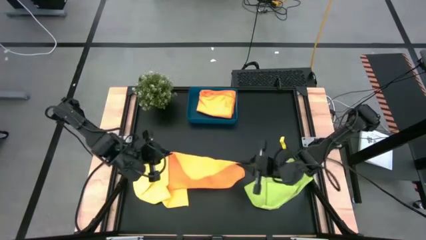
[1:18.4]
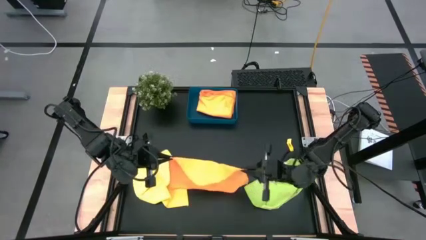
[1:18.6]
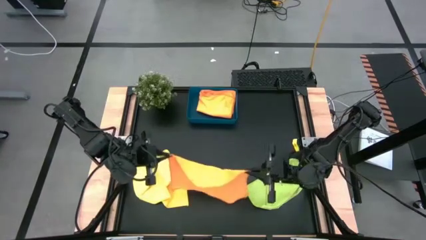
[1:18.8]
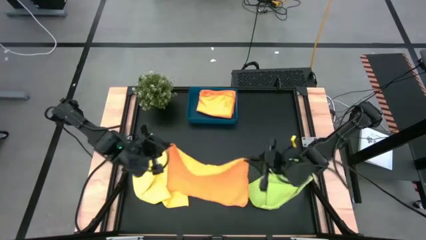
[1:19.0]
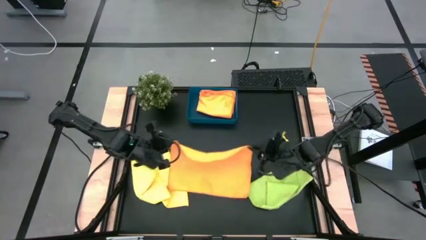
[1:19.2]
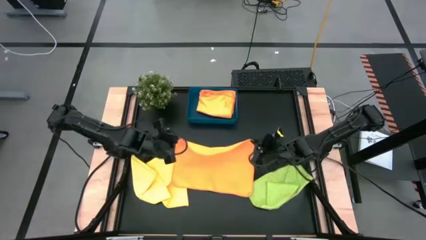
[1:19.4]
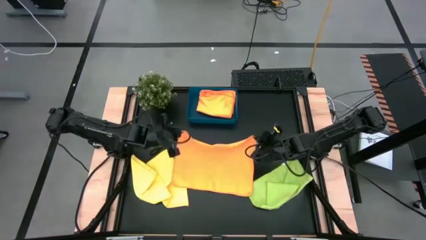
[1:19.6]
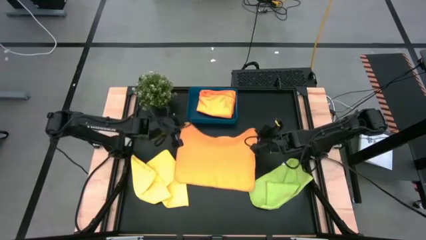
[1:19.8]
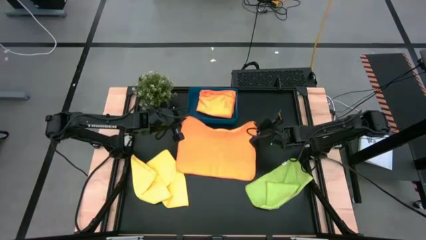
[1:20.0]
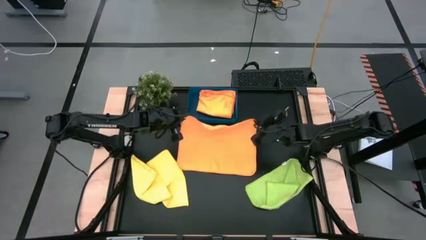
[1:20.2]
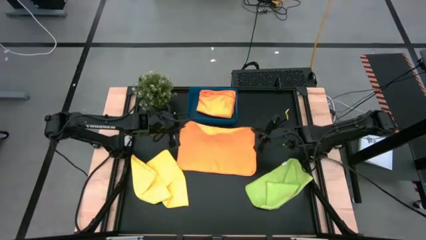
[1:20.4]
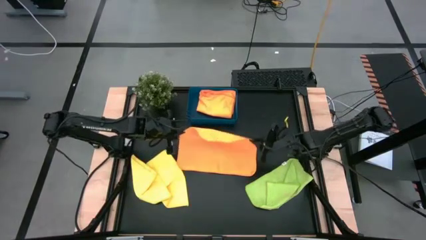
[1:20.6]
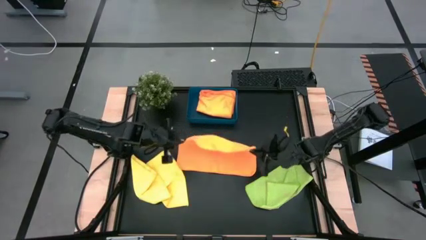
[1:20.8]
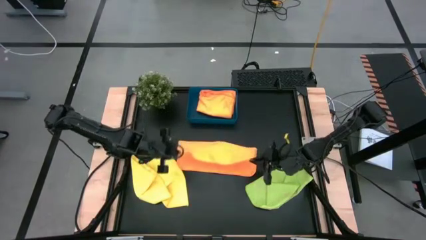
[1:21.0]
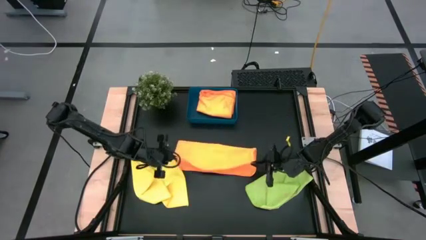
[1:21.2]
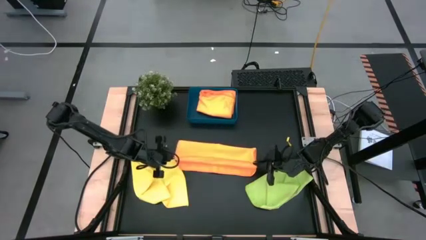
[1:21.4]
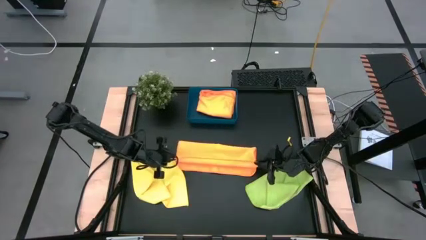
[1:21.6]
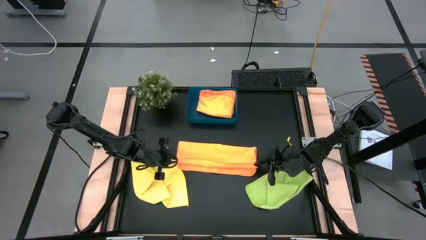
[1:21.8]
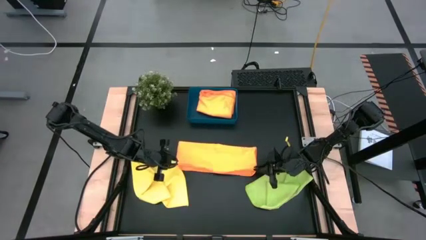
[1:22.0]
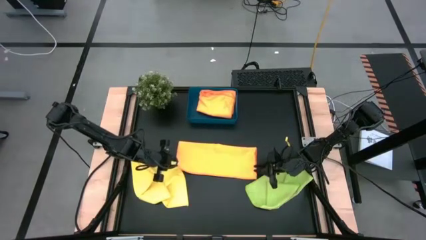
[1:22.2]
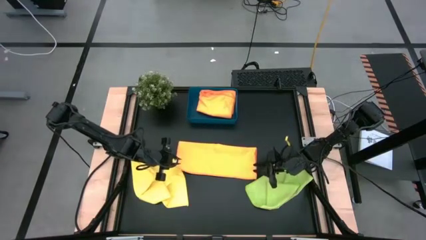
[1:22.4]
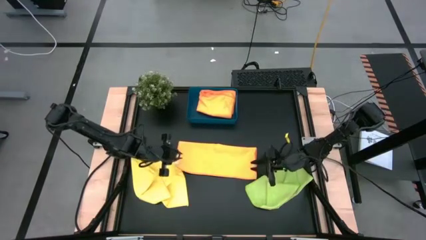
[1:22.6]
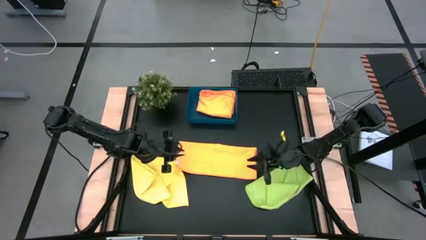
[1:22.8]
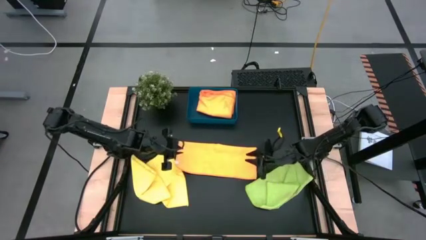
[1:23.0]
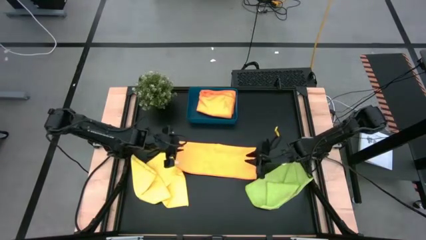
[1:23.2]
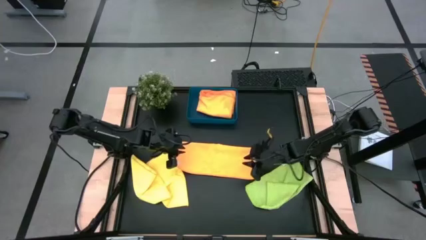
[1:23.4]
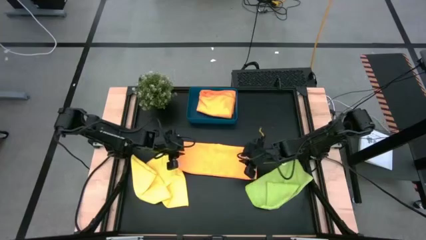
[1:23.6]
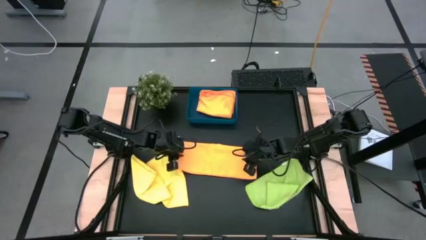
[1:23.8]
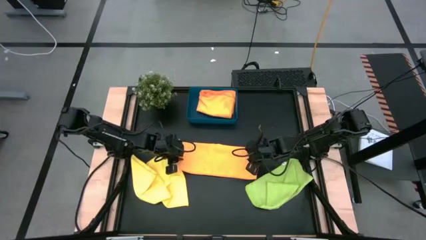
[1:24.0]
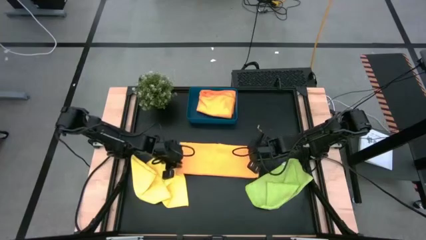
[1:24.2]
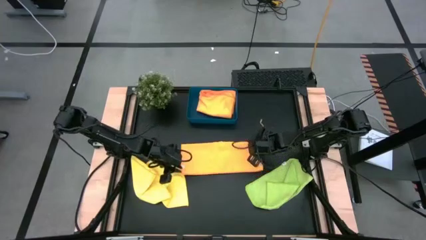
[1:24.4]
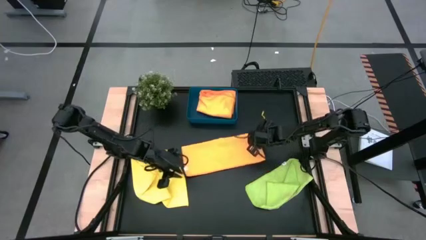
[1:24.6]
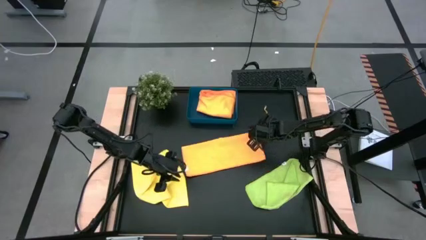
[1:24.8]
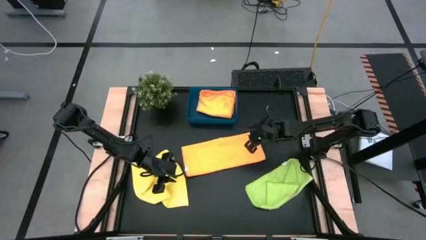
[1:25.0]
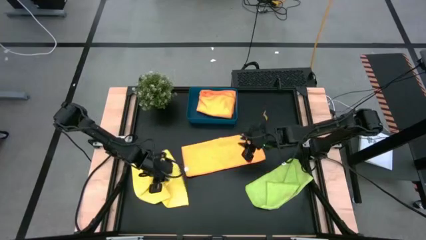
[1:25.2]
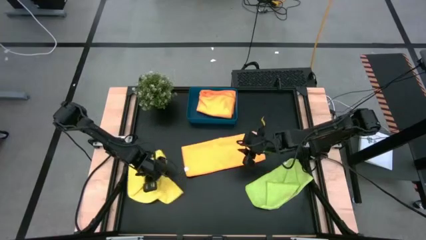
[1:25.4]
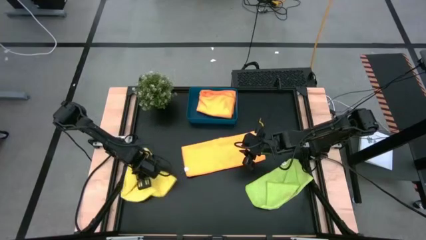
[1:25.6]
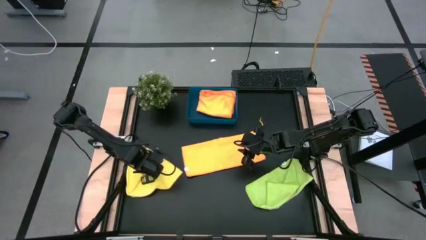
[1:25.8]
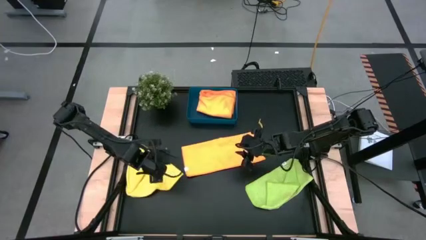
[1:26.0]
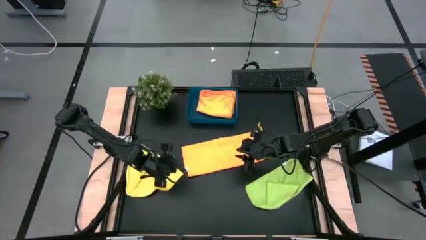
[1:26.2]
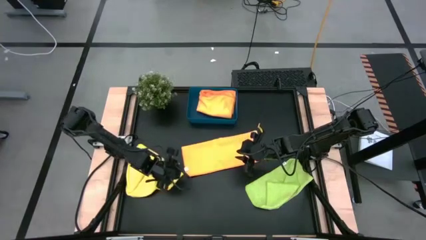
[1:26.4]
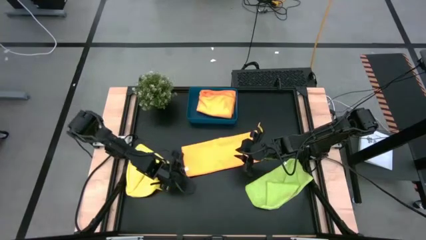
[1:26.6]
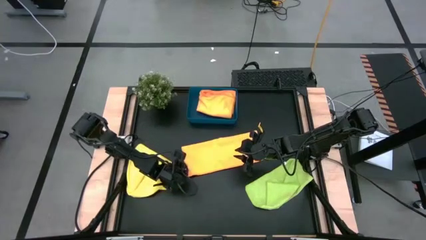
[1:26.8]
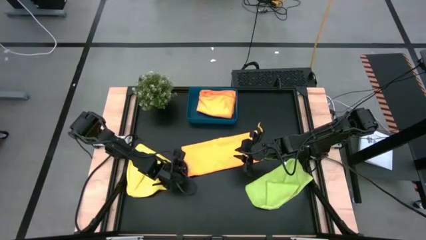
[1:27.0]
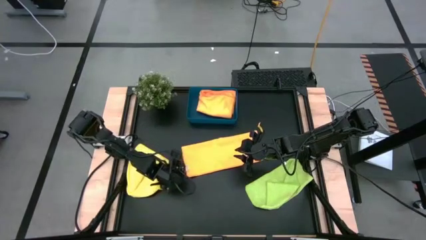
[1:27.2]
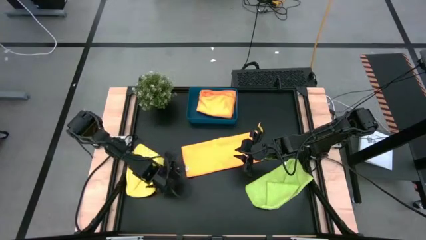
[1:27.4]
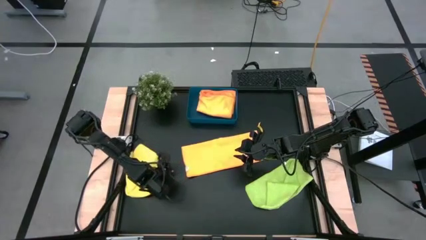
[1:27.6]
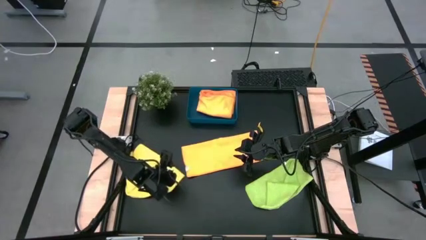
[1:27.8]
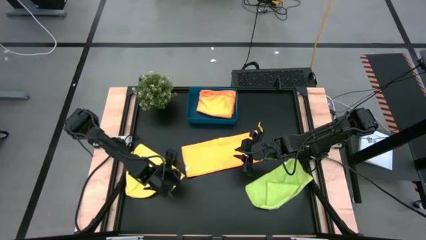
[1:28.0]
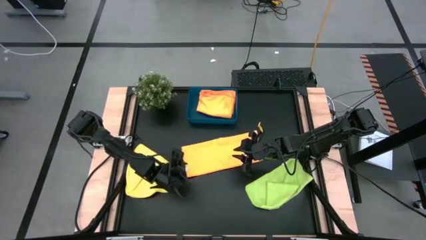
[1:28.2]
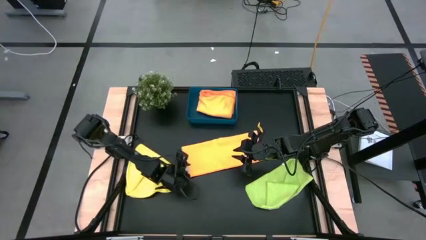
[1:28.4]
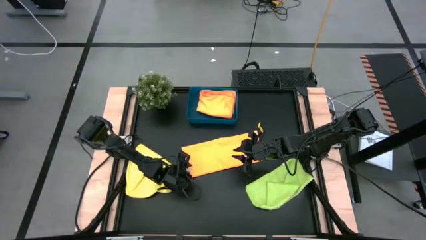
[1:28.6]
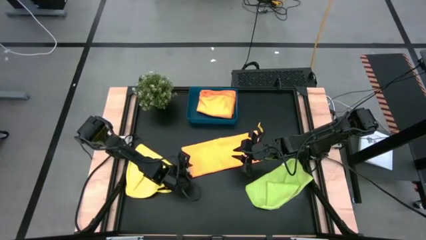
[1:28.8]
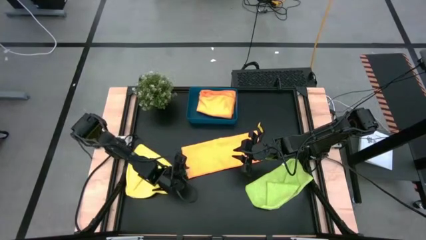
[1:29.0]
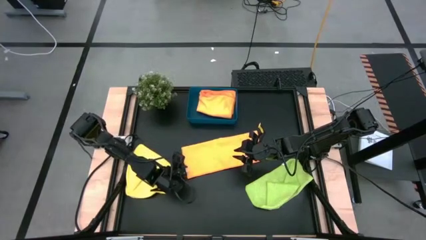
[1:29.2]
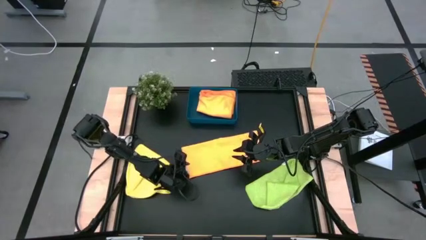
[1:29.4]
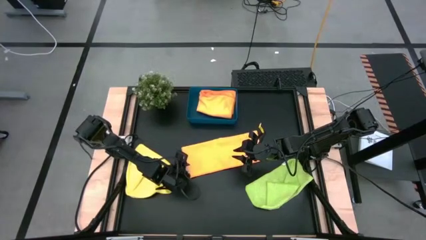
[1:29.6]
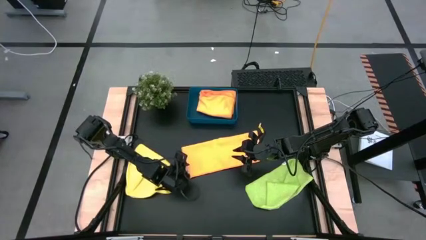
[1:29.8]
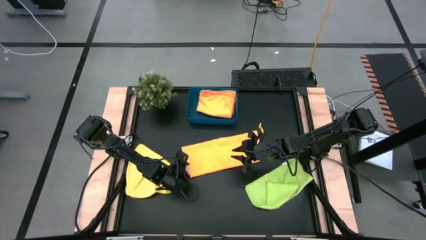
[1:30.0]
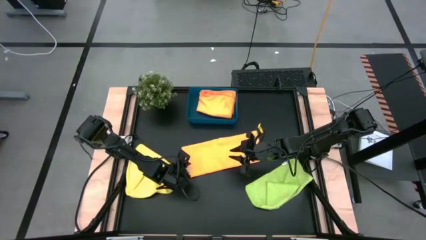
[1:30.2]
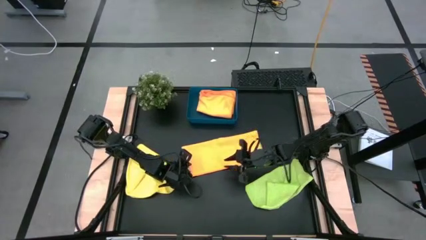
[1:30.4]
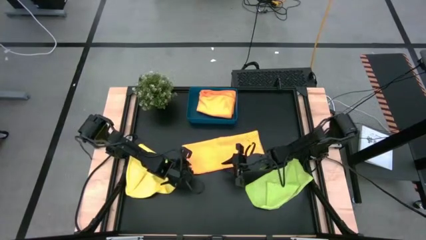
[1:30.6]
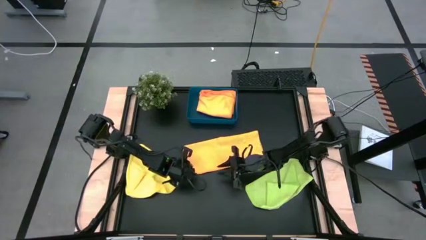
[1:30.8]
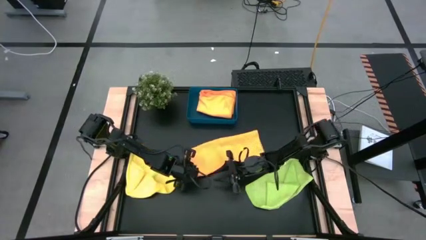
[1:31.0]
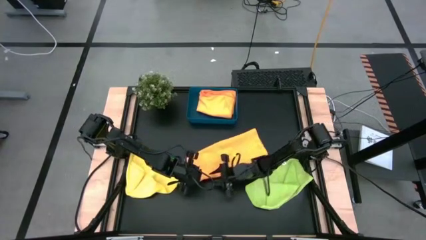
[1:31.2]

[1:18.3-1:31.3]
Task: Fold microfiber towels
Fold the orange microfiber towel

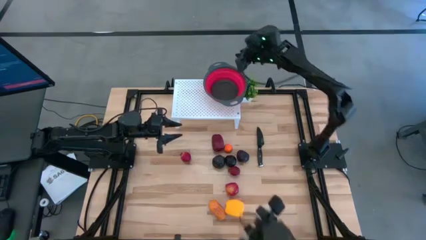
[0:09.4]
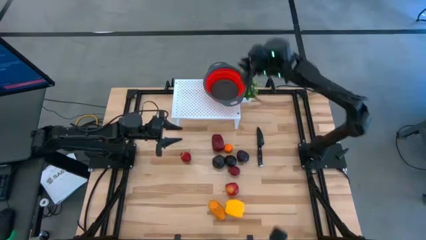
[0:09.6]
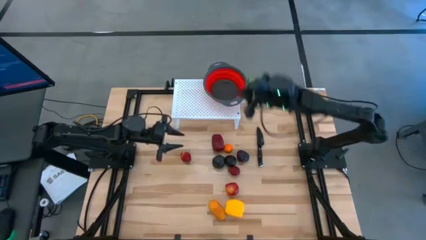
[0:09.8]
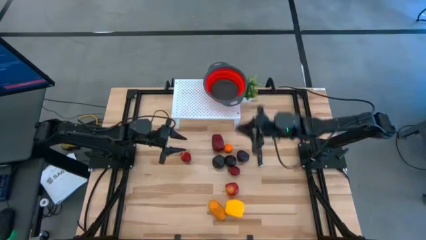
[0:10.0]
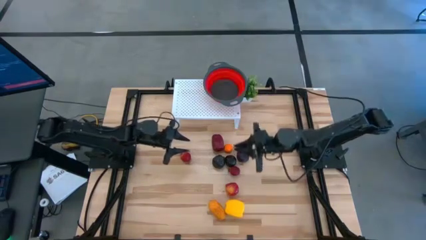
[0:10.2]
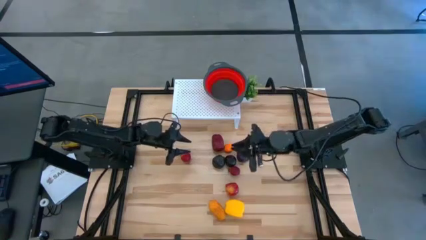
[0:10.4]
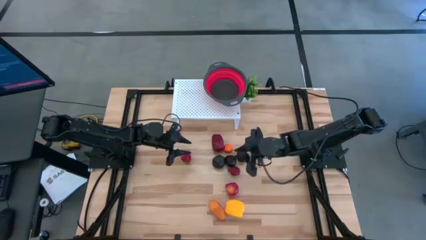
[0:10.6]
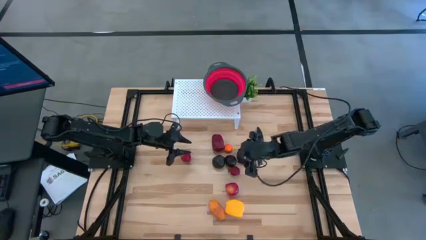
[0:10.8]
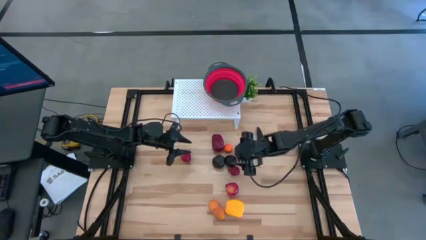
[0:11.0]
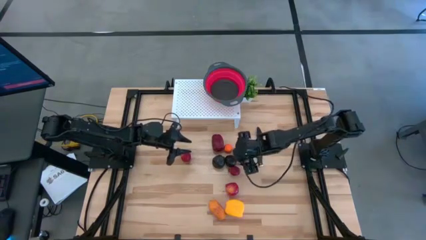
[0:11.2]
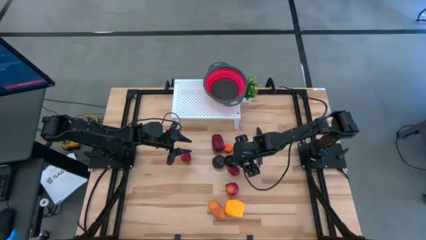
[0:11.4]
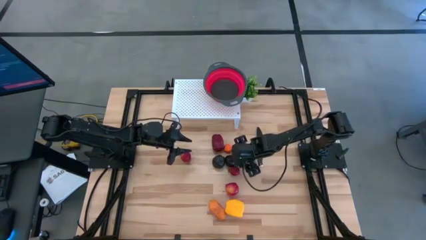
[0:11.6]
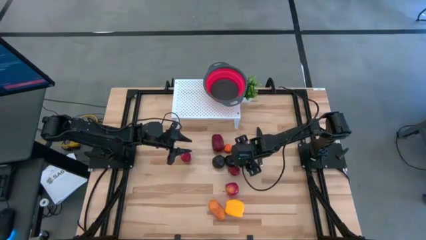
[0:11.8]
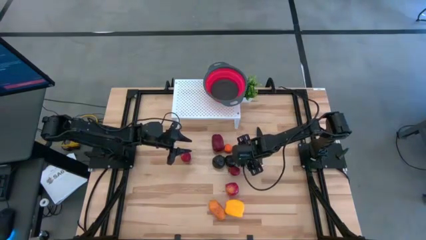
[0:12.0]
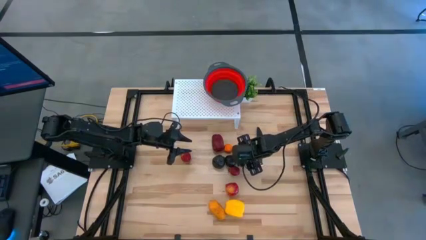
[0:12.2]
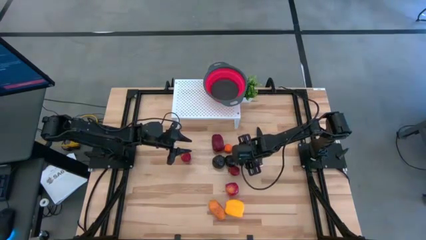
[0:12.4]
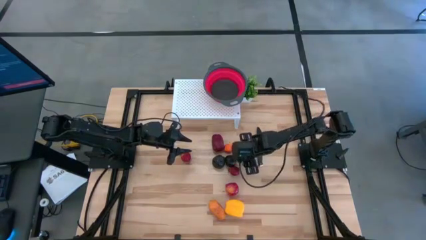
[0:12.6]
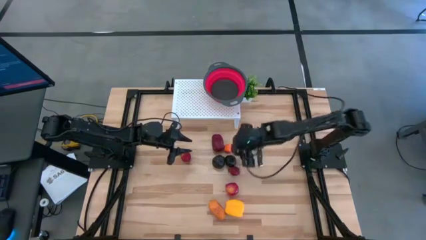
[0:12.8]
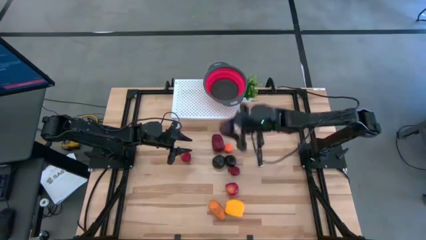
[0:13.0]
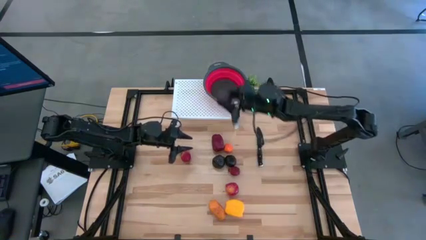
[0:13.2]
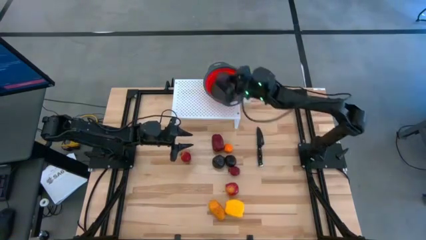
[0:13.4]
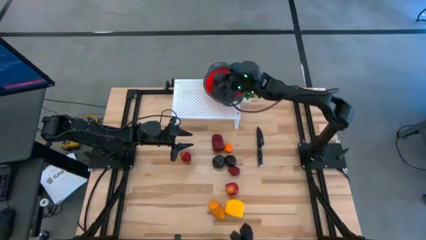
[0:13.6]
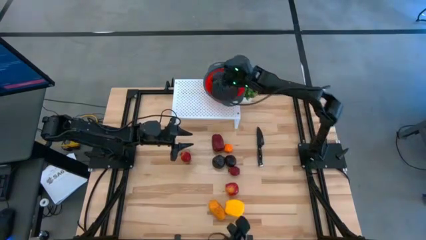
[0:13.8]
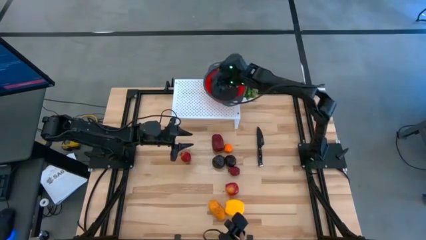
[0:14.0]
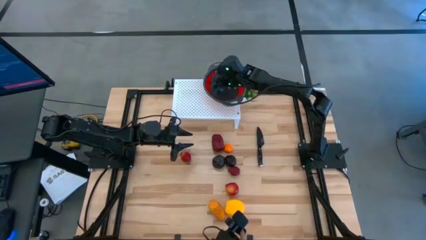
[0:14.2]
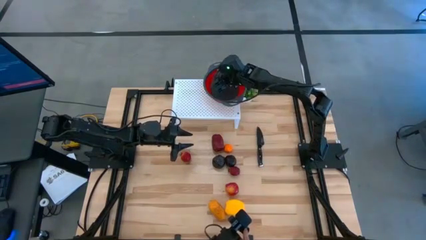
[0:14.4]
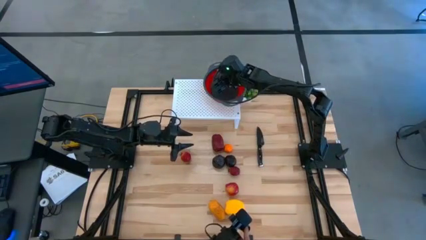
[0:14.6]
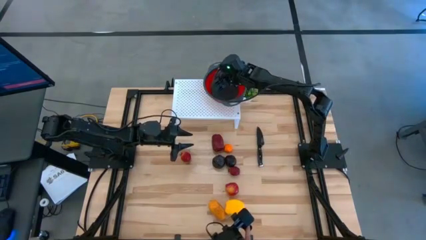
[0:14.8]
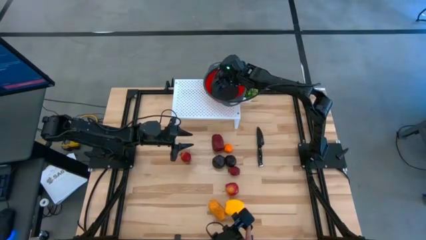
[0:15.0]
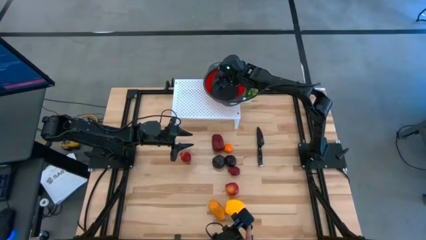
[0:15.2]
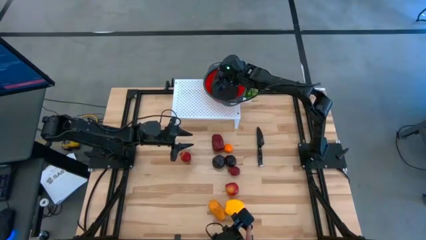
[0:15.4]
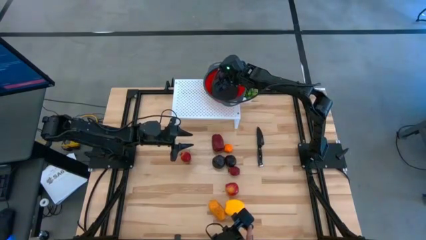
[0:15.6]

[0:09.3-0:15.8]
Task: Pick & Place Fruit
Put the right purple mangosteen into the red strainer bowl
